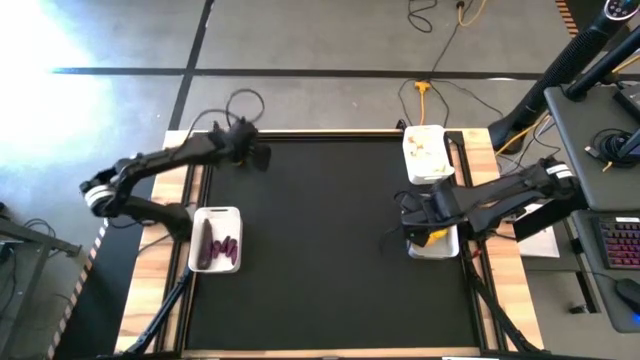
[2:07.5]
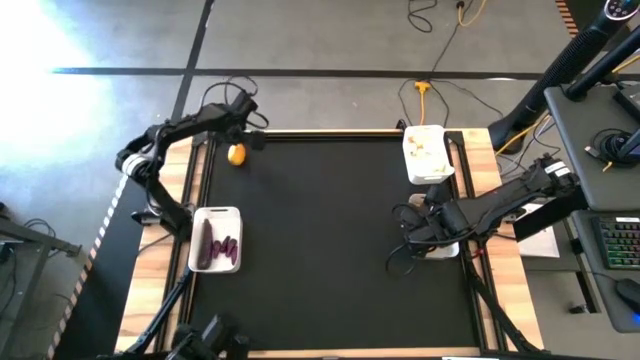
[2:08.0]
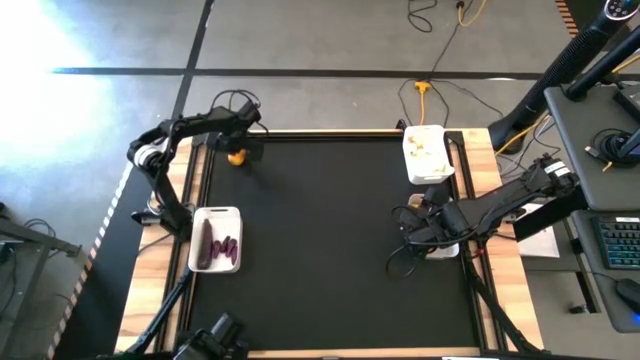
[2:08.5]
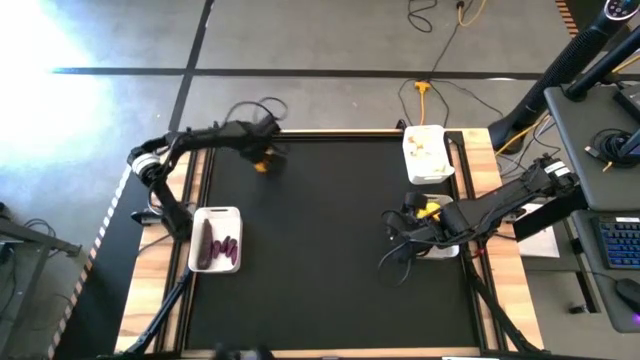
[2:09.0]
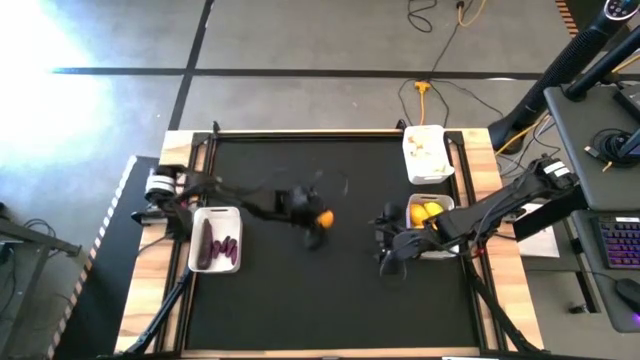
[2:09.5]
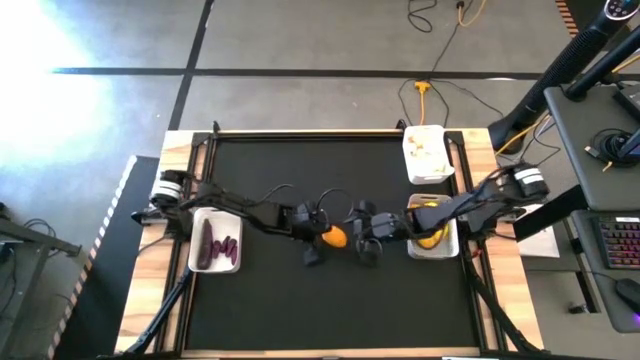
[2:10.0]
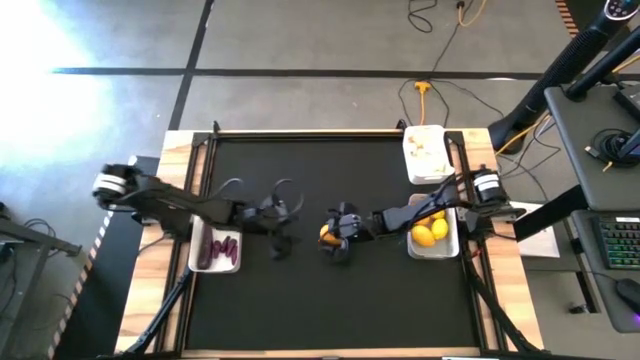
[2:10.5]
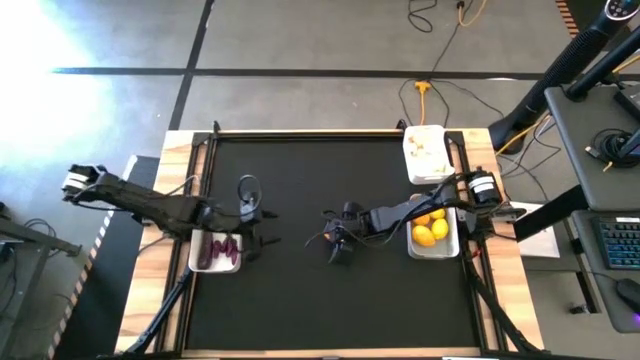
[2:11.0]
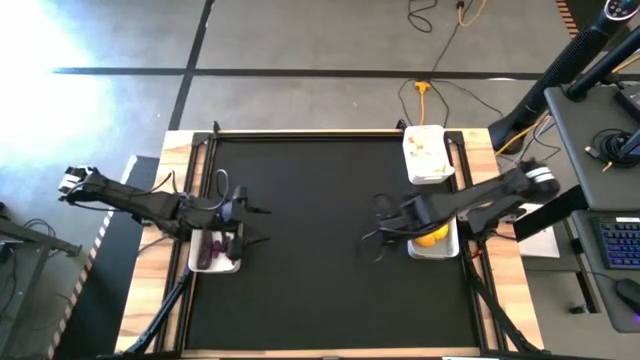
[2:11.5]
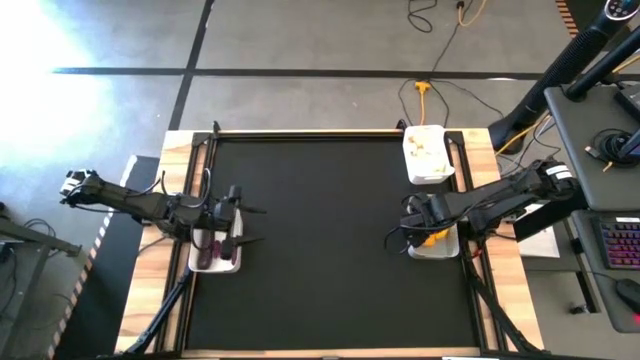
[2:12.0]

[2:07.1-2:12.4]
Task: Sort produce into baskets
Put the lemon into the gray bin

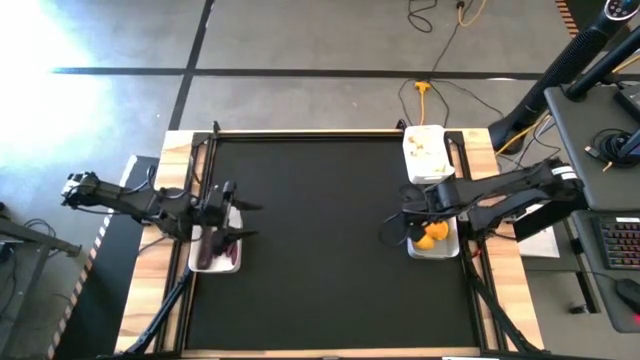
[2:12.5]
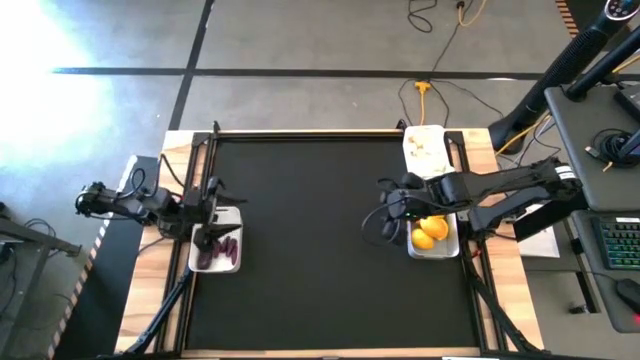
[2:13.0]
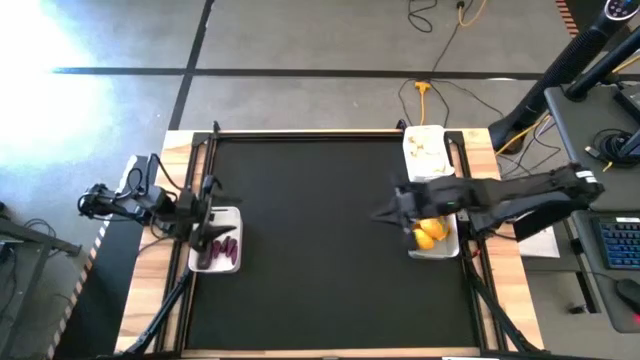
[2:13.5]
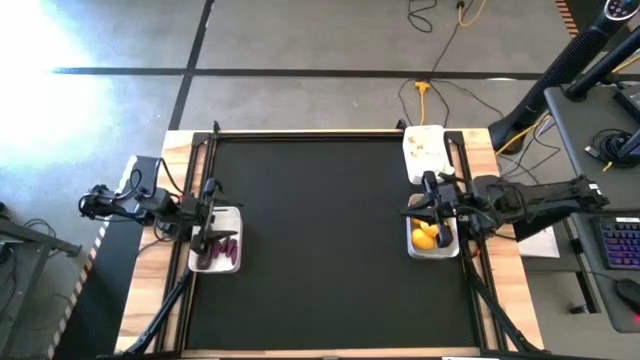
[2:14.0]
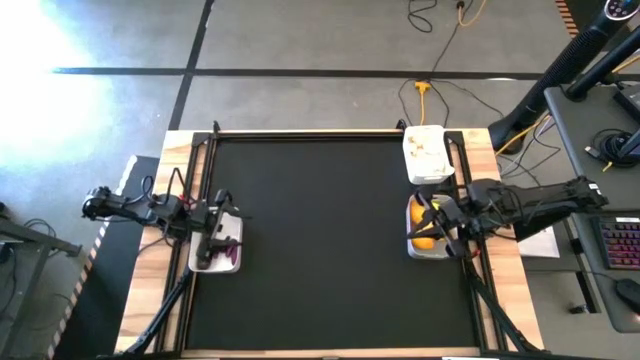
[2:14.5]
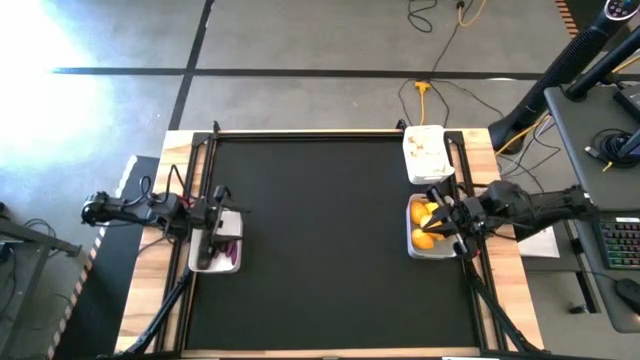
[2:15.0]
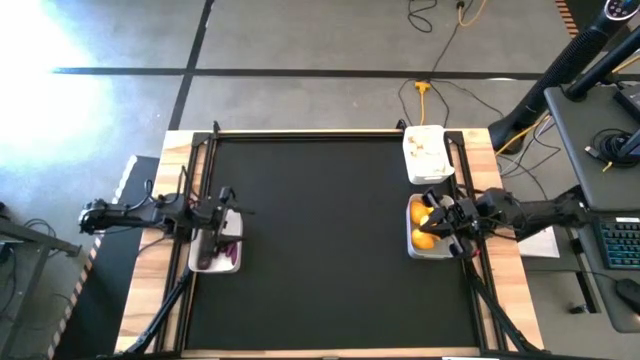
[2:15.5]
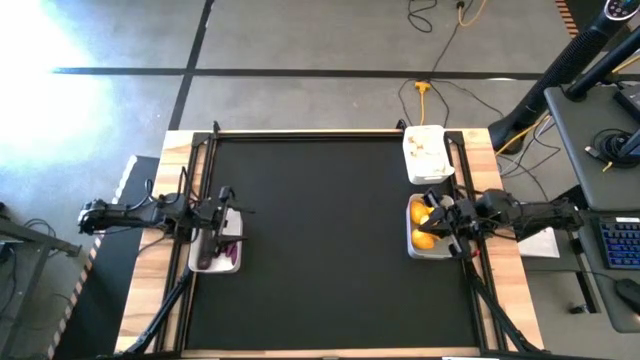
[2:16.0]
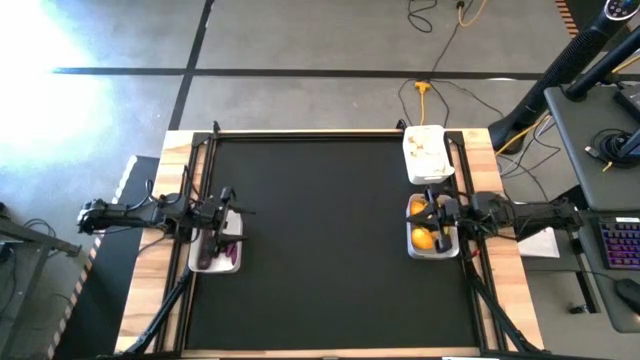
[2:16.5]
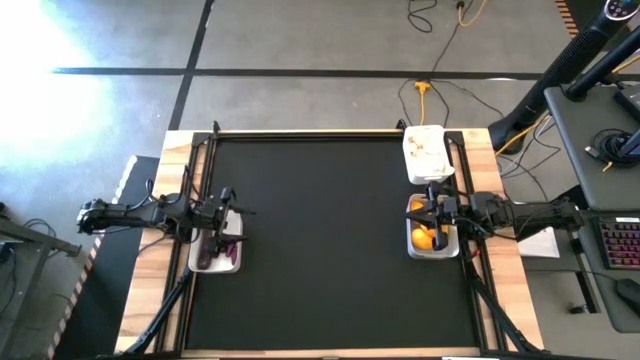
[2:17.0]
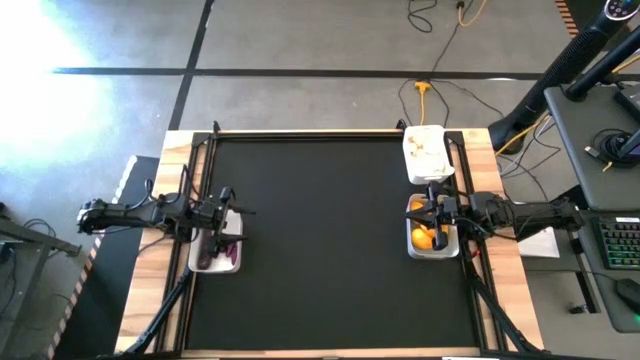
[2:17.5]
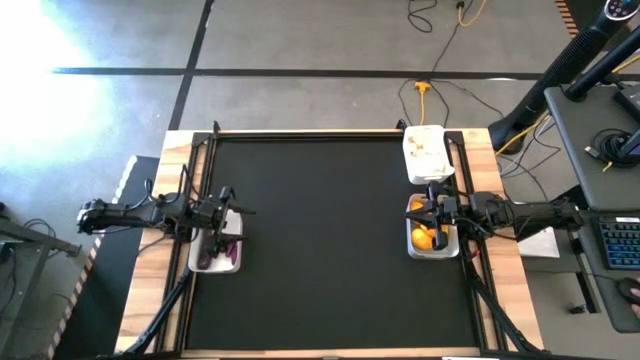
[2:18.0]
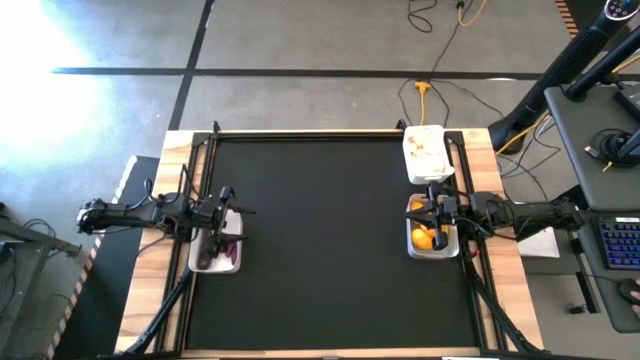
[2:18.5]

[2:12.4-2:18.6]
Return to Home Position

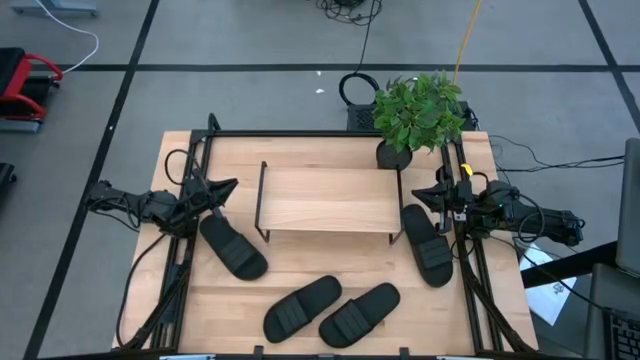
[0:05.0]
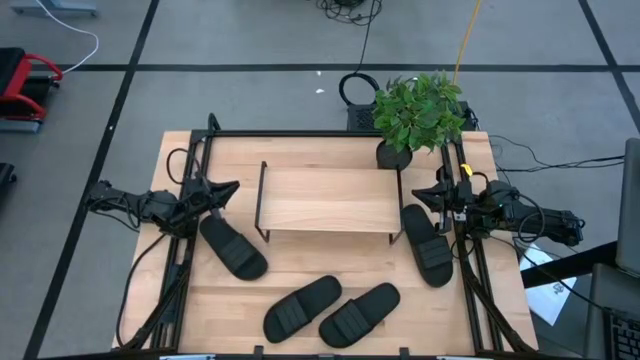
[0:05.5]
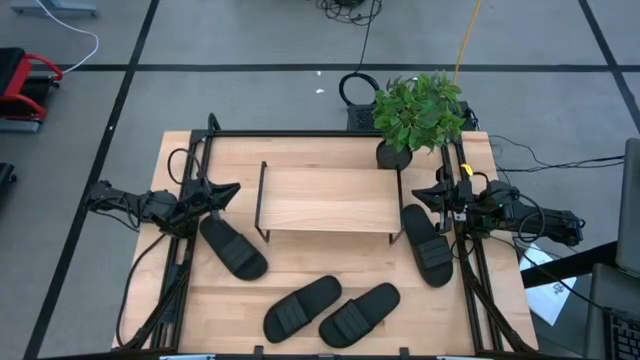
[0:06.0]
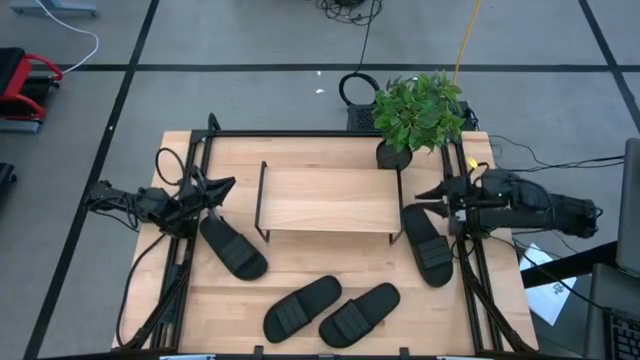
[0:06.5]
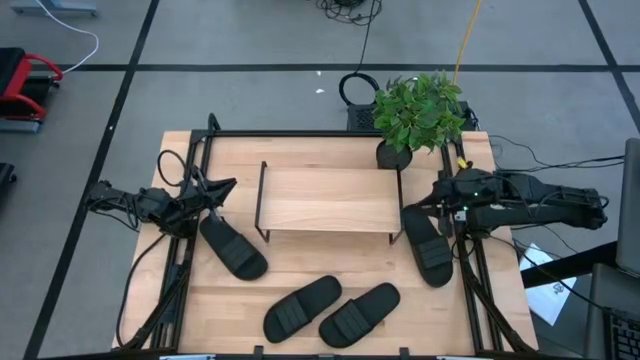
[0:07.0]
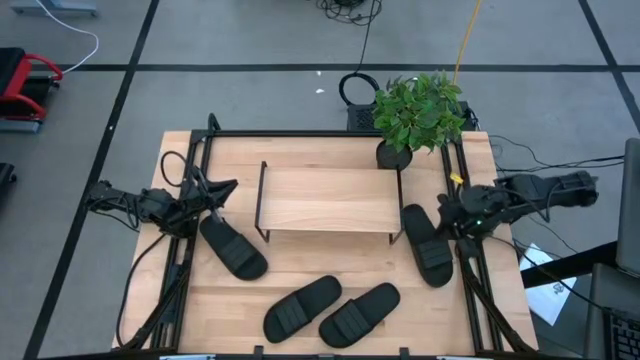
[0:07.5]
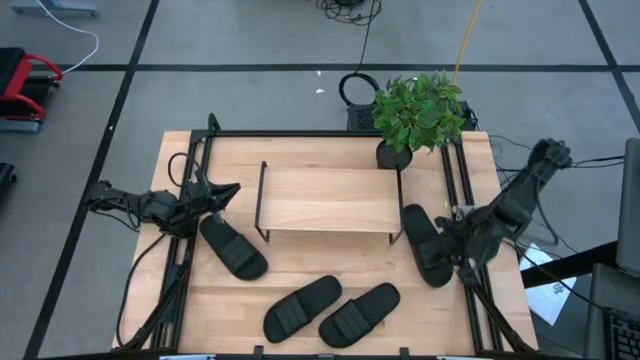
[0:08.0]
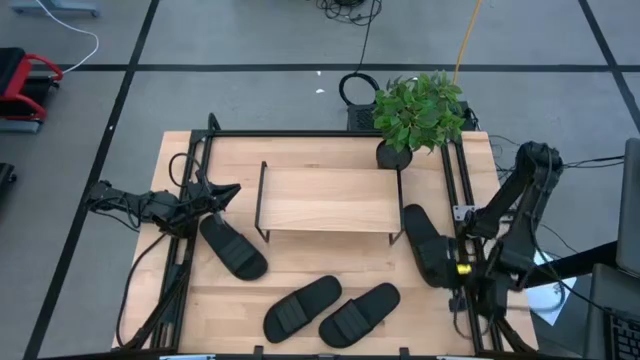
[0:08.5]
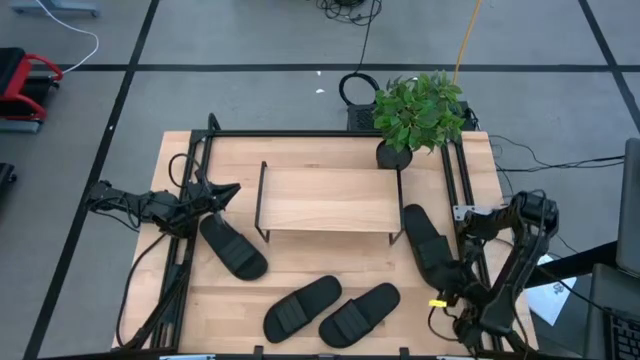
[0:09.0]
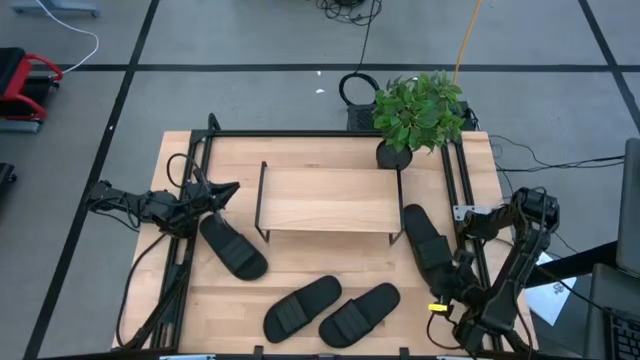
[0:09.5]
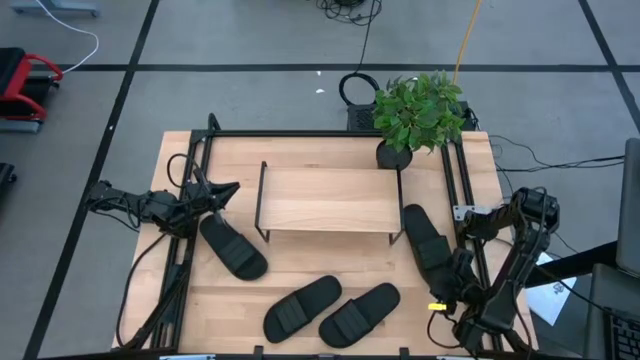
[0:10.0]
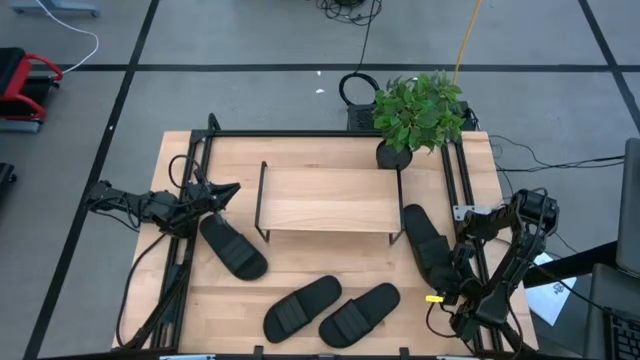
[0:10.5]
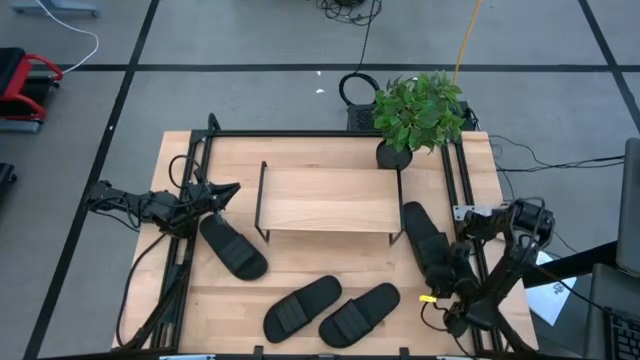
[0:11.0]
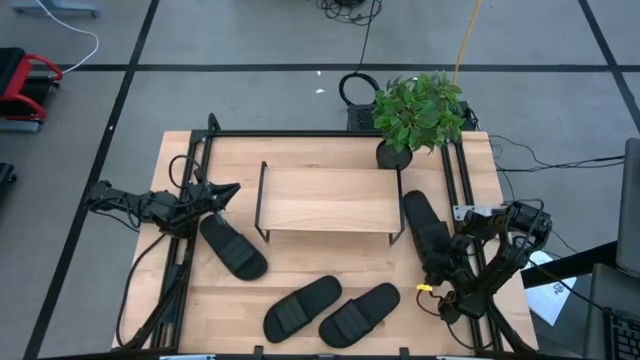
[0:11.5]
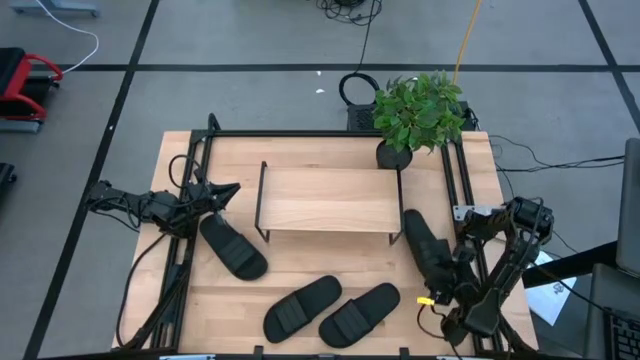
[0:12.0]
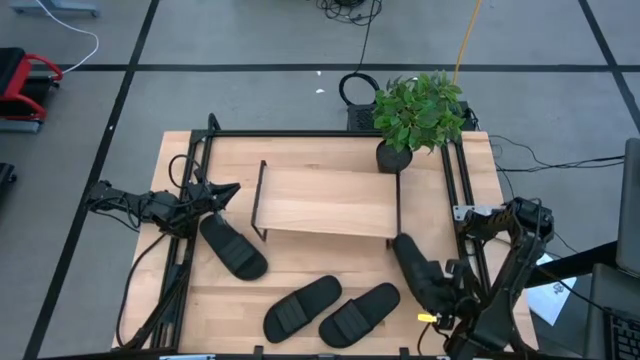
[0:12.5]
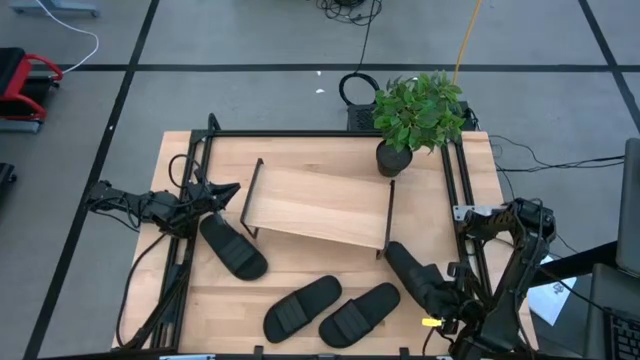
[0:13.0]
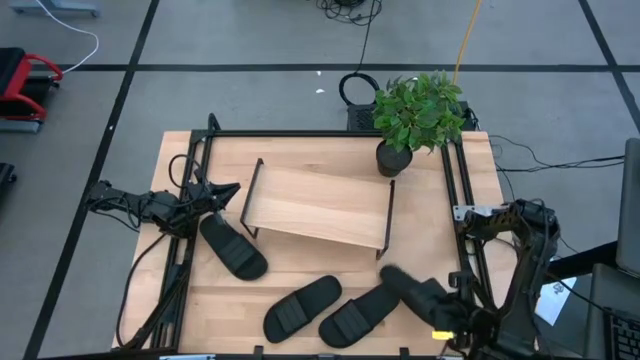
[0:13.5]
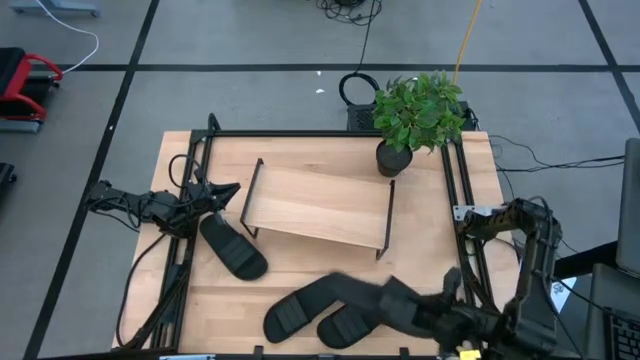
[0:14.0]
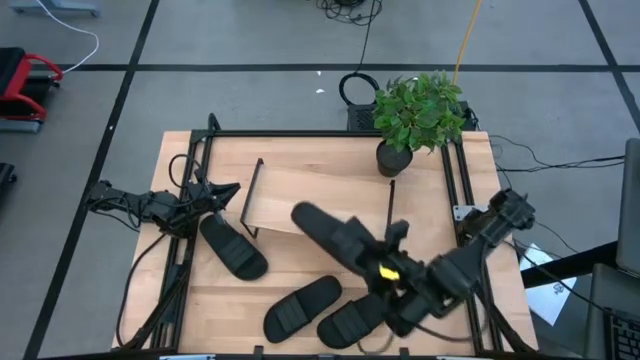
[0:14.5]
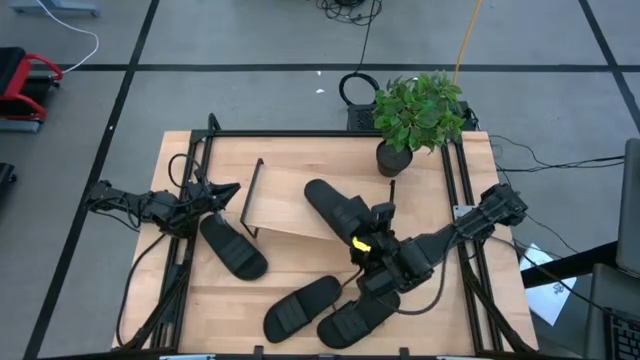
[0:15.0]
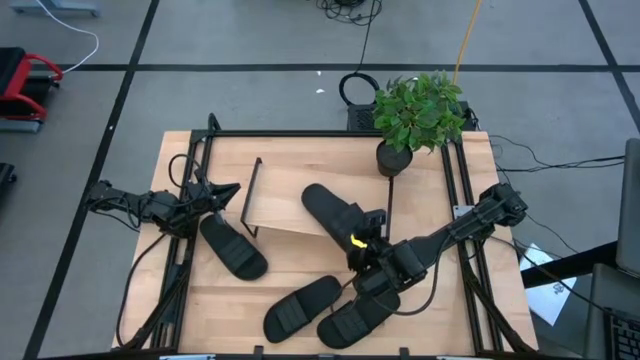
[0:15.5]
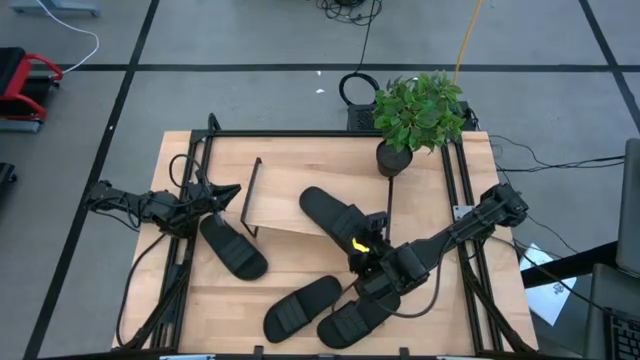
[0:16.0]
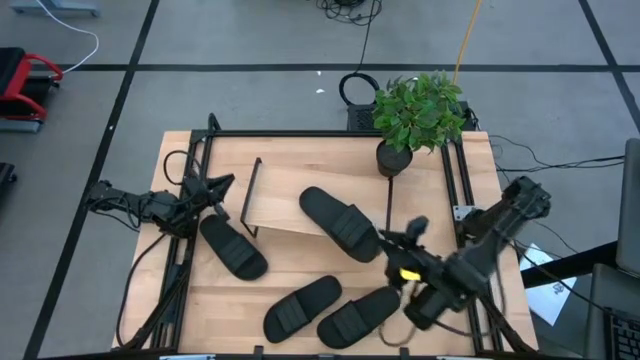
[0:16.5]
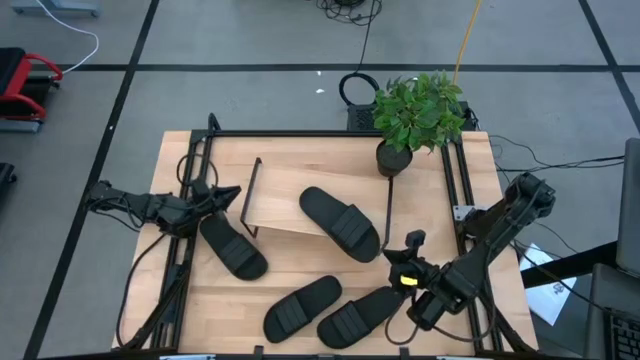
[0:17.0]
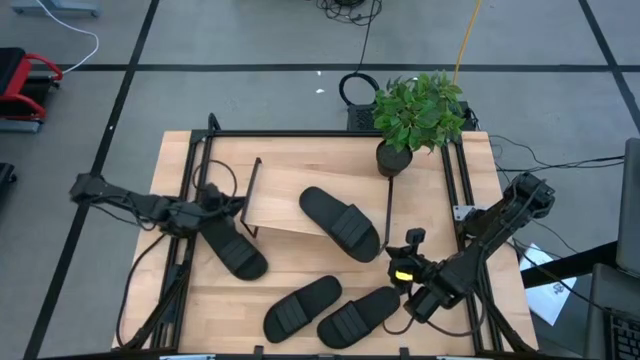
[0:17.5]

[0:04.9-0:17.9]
Task: Pick and place slides into the shelf
Put the black slide on the shelf
